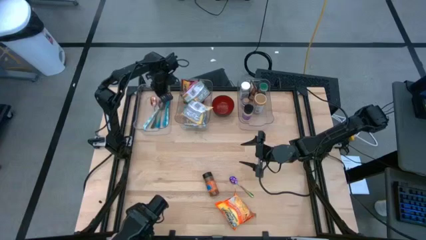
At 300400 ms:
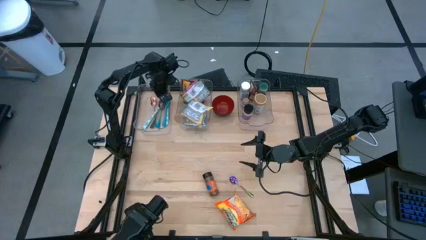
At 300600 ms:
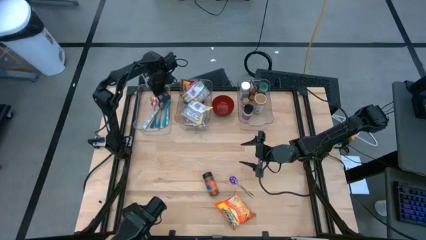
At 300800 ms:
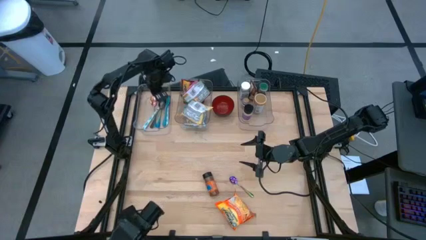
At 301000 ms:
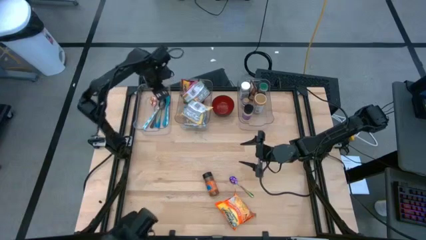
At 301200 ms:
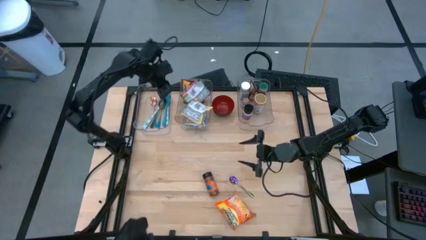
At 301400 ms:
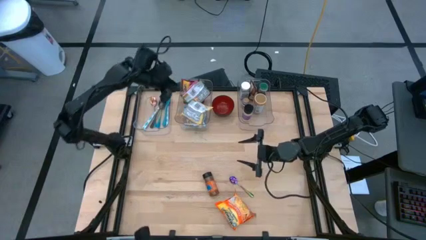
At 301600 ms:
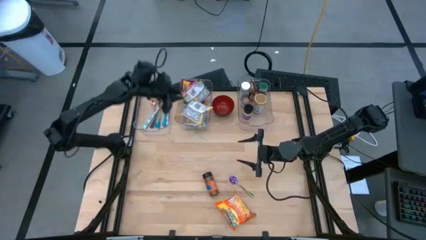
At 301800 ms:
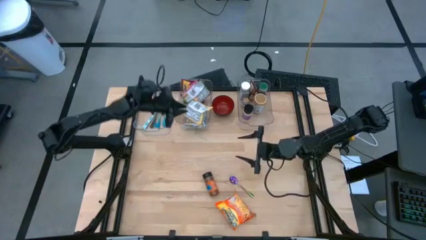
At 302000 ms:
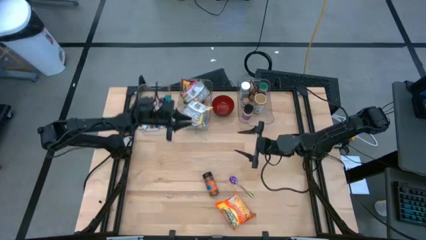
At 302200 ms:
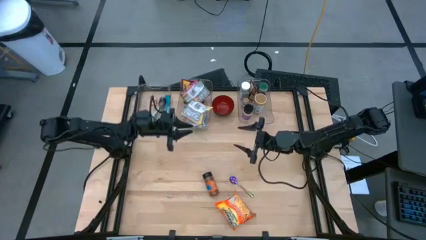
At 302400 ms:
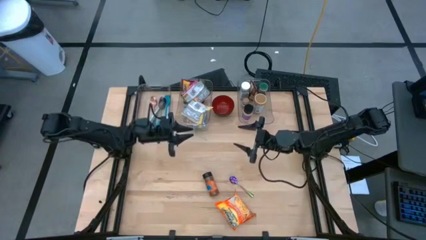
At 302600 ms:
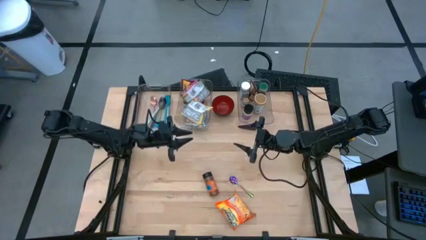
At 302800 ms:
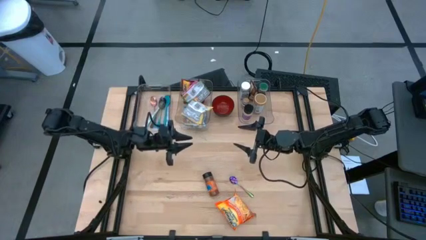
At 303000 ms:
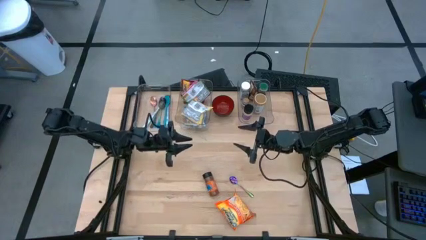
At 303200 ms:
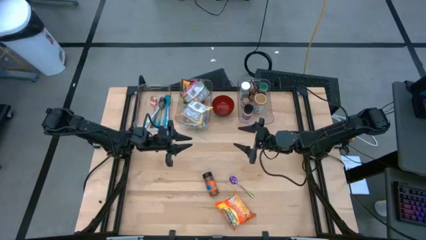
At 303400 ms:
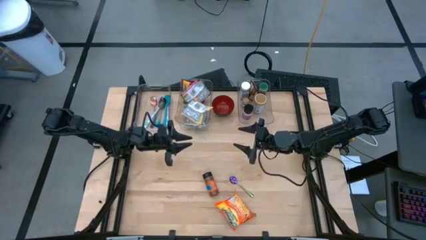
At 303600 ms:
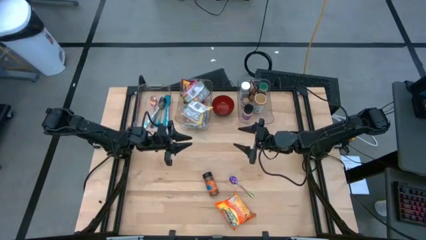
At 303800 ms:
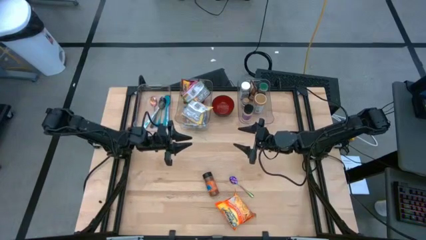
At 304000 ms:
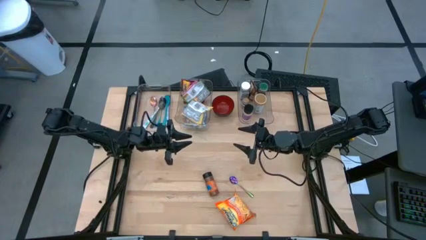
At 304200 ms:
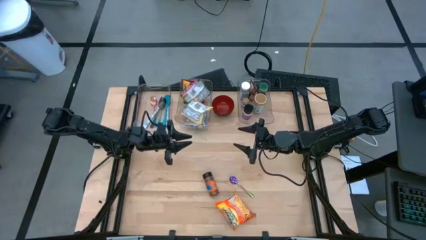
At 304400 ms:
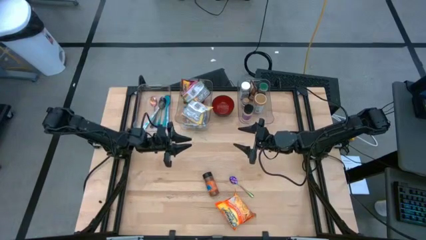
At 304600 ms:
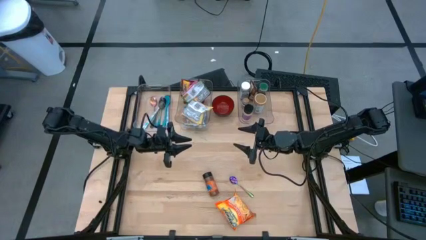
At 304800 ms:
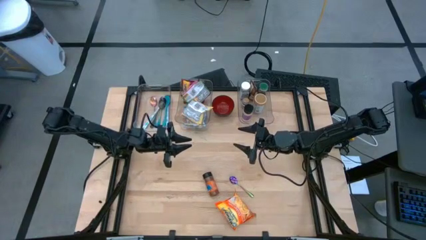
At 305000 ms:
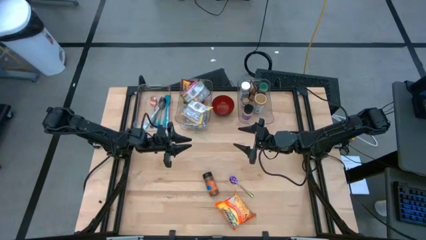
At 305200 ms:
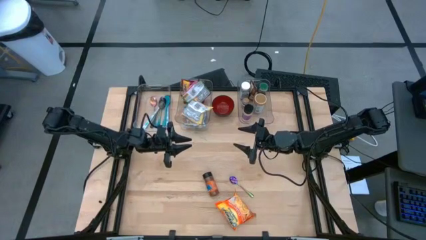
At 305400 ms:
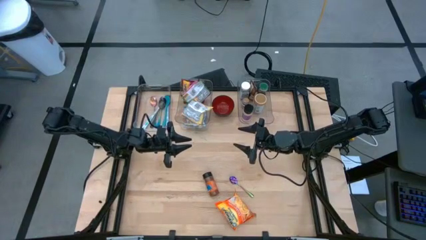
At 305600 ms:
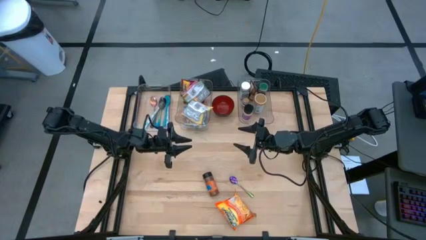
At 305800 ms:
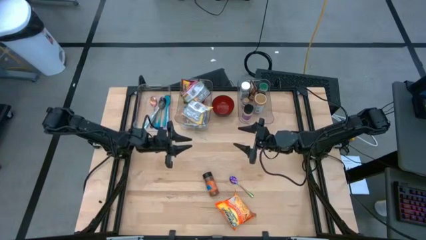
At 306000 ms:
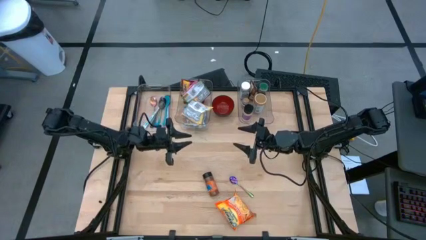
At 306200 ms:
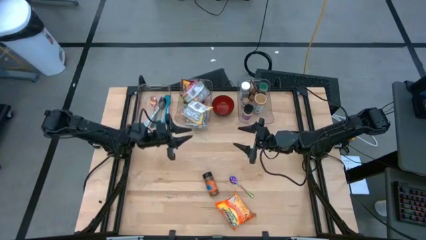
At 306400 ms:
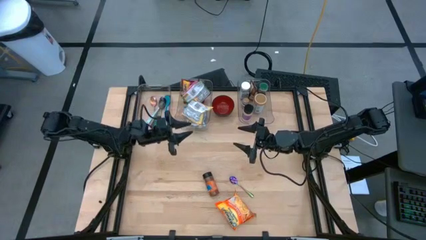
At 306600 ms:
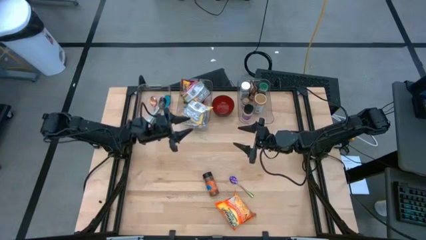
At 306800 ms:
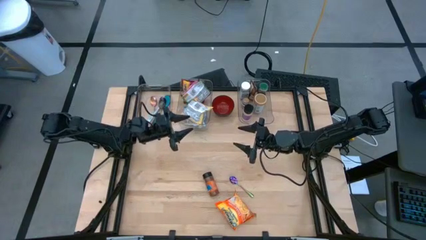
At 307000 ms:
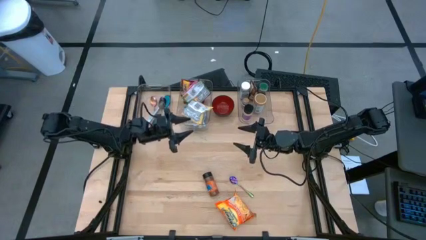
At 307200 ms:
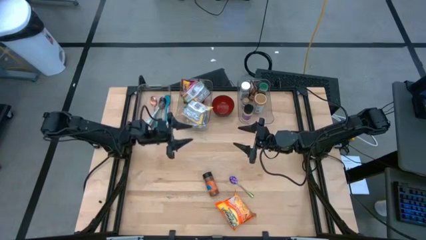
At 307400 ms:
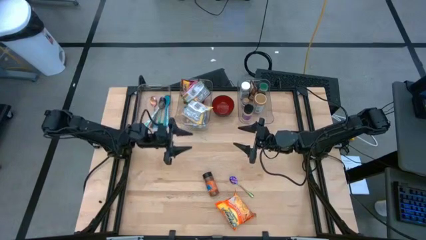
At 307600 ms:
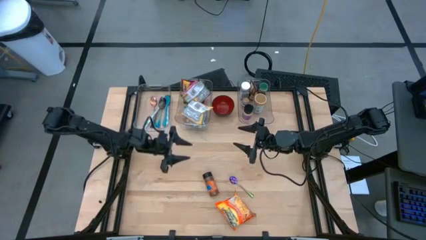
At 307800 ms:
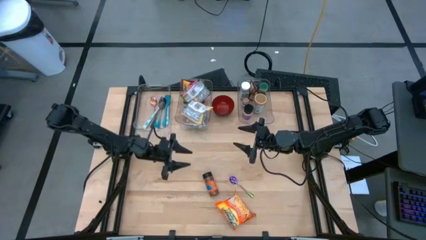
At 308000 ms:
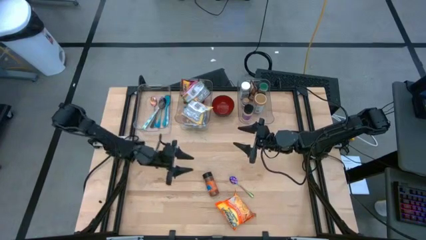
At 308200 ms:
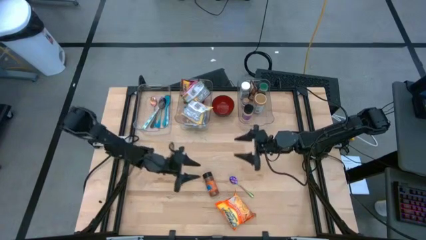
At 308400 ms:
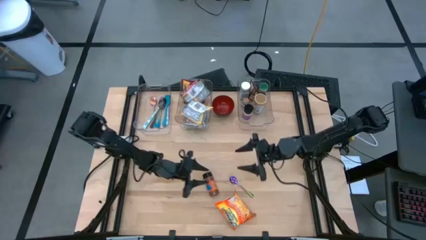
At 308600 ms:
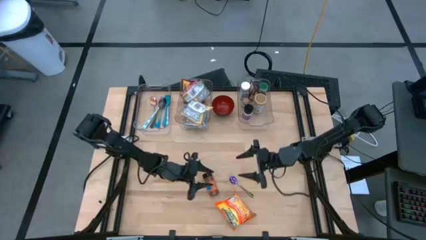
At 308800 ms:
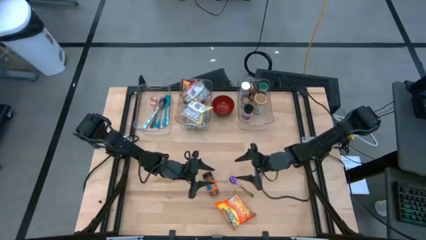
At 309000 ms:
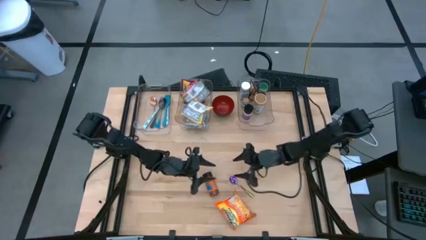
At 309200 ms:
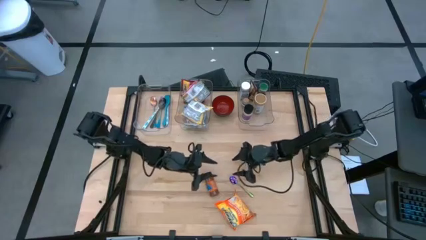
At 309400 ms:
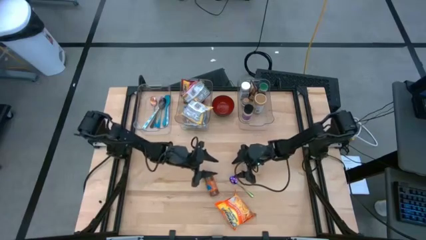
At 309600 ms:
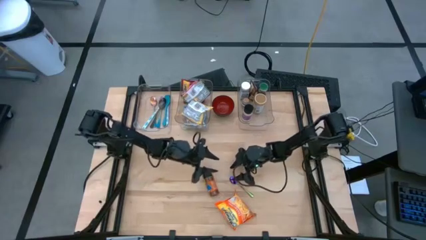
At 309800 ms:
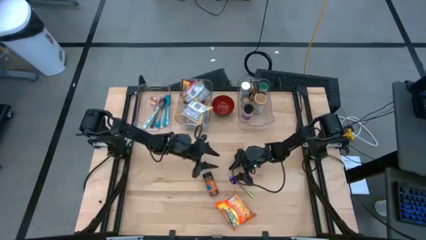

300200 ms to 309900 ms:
Task: Pick & Place Food Item
Put the green spoon into the left transparent bin

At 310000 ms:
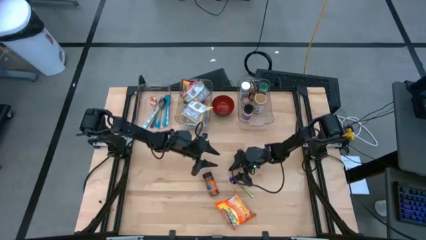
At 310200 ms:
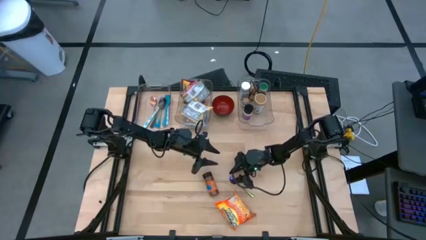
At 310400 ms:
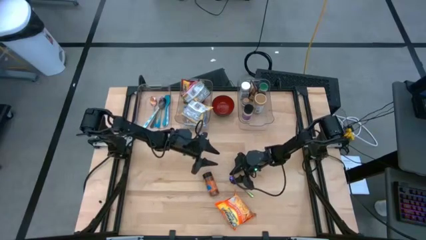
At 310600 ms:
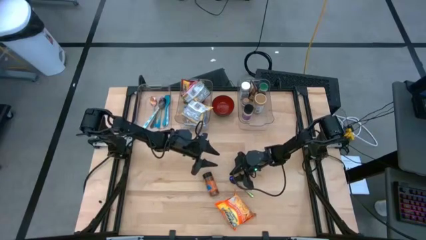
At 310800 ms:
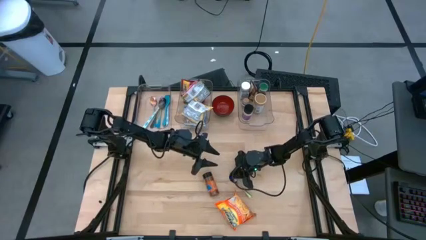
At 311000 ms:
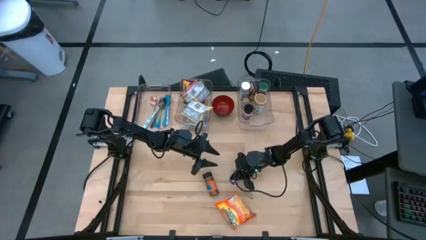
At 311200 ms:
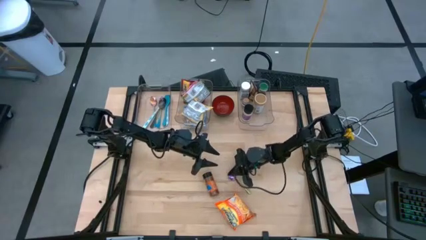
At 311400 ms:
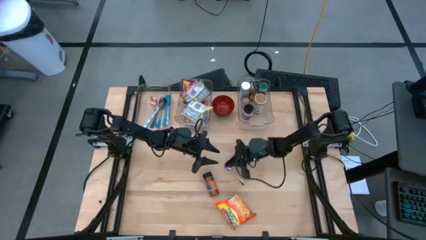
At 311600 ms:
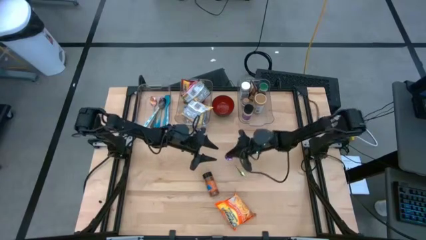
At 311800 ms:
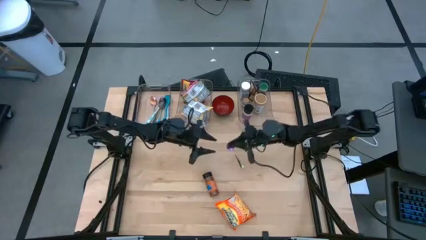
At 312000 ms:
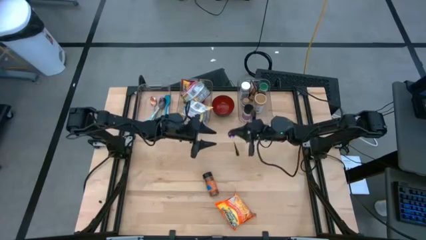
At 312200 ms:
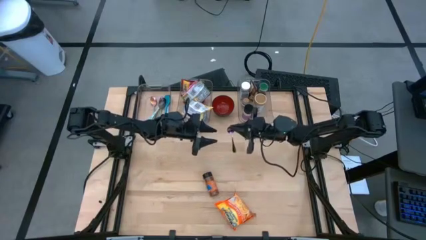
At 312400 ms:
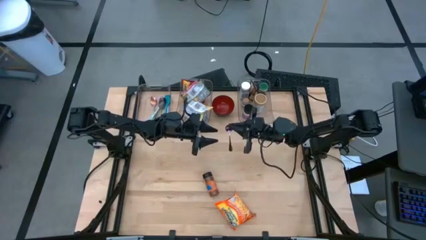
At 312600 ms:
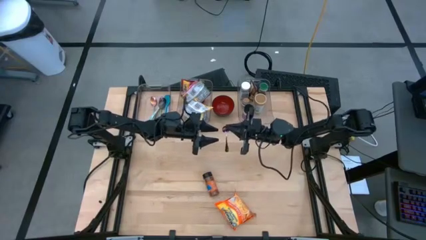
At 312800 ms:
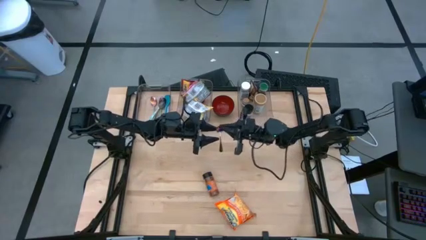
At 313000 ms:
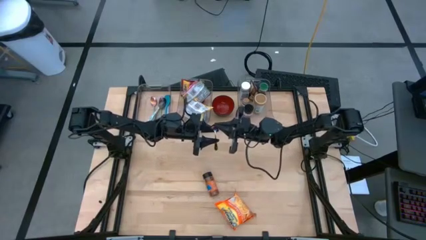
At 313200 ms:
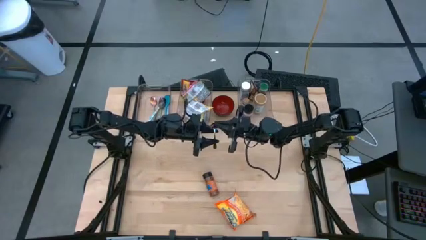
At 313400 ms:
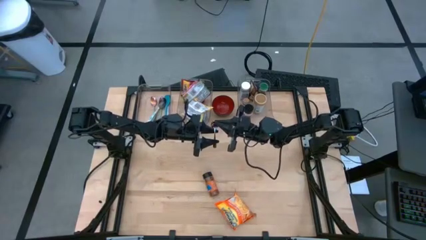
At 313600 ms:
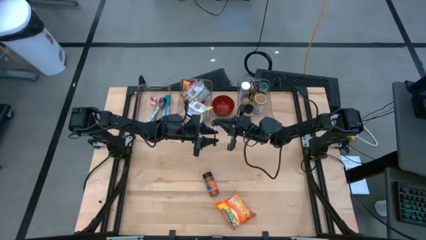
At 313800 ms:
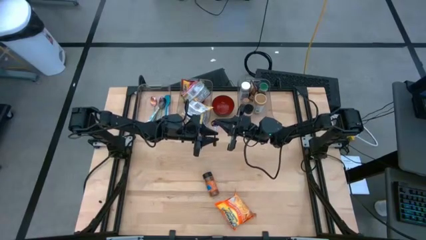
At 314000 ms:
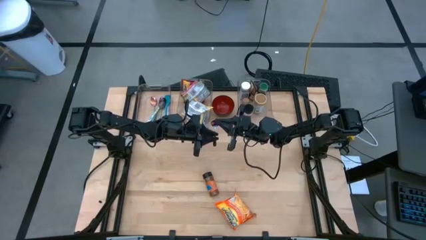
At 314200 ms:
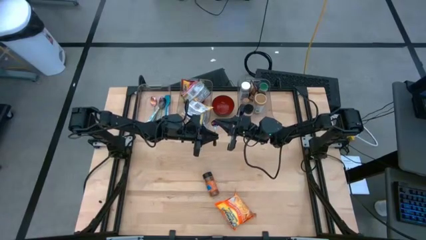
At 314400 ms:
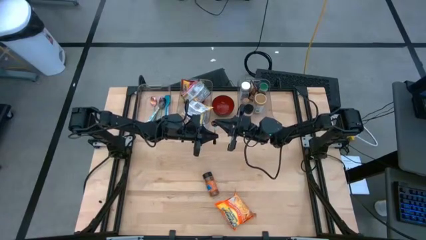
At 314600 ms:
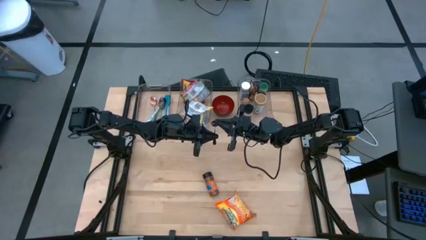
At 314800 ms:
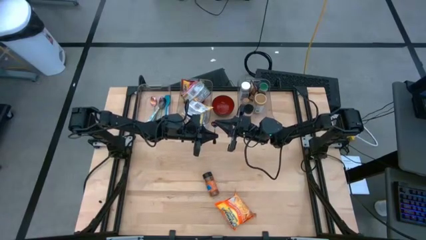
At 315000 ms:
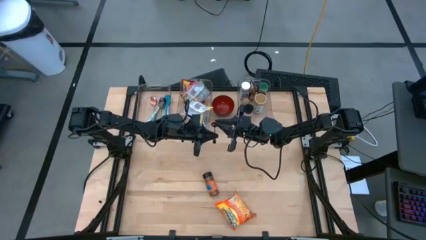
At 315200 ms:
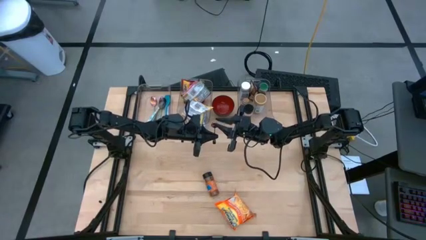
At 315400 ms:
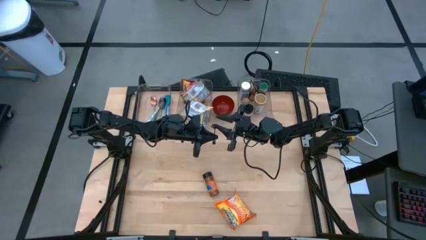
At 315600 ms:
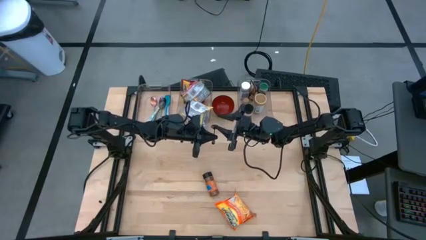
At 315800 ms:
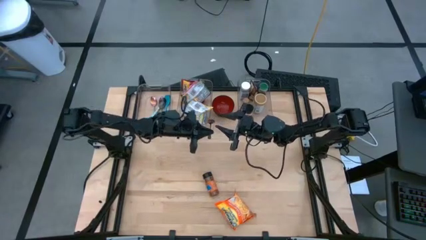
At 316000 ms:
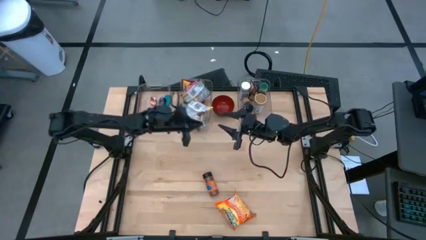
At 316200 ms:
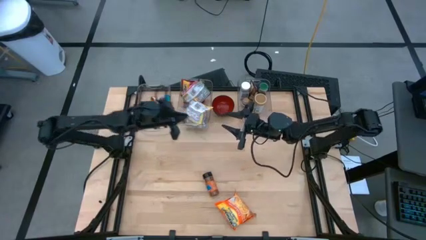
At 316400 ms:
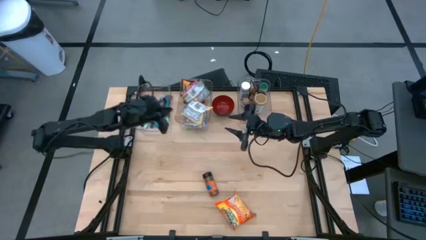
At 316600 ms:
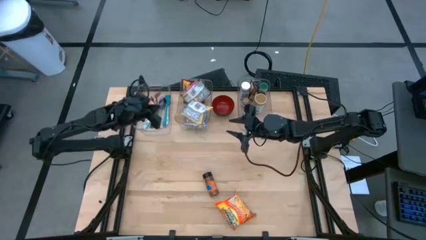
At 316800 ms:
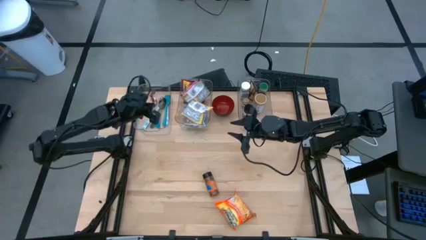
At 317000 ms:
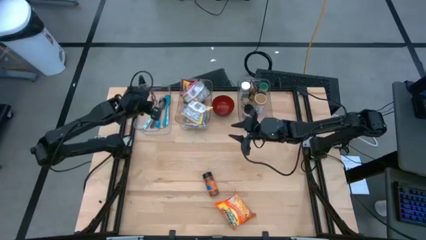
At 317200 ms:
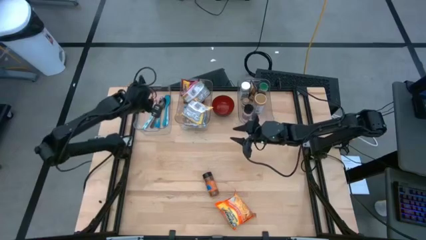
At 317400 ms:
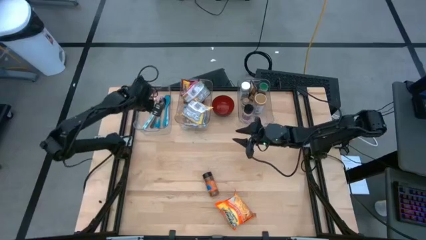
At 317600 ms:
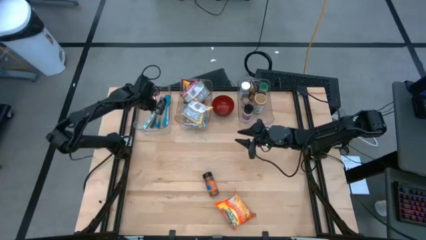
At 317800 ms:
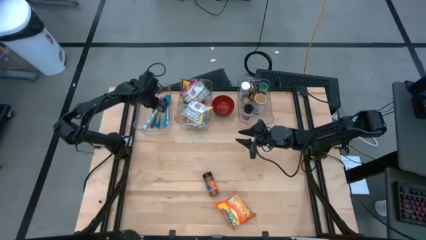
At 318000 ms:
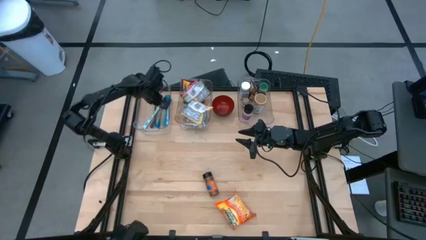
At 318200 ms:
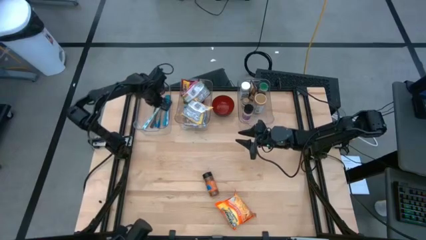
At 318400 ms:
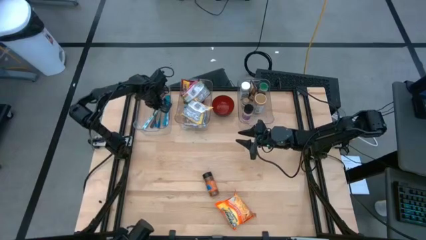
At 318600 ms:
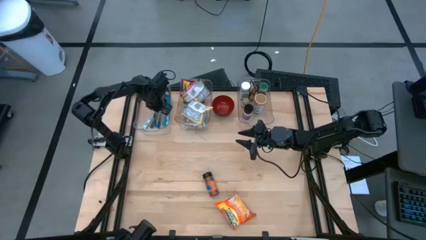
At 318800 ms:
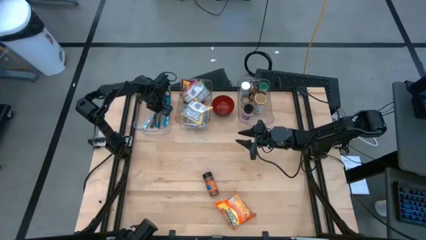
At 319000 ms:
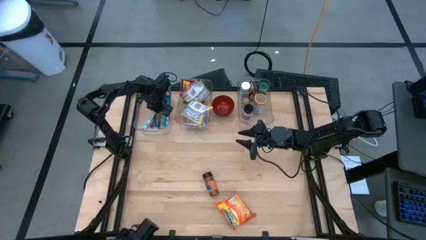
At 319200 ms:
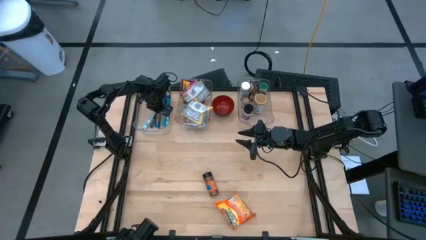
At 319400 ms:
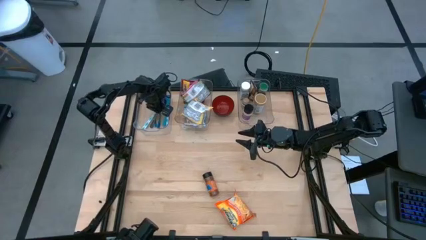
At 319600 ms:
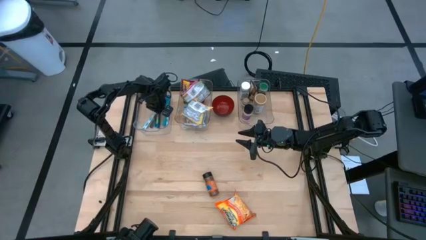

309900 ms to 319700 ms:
Put the green spoon into the left transparent bin
